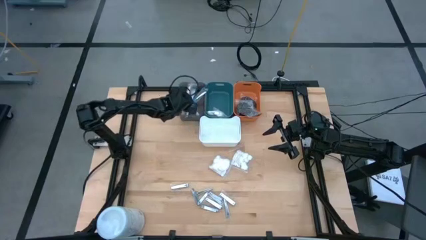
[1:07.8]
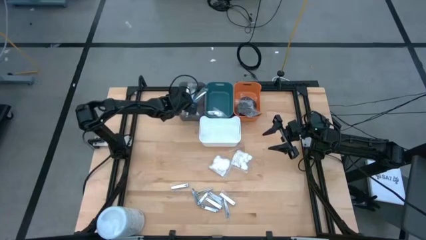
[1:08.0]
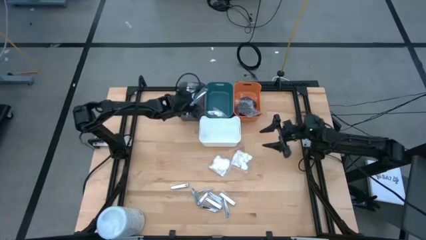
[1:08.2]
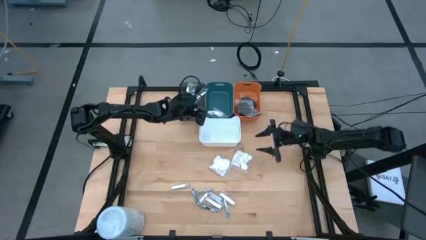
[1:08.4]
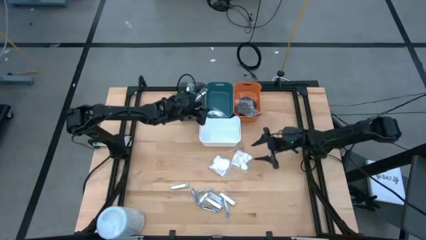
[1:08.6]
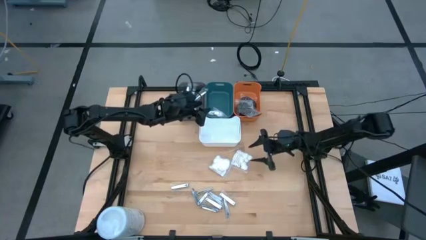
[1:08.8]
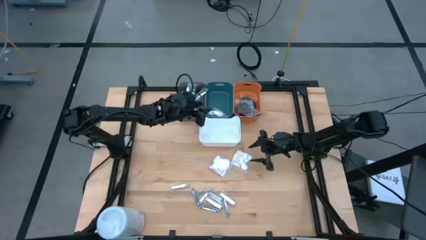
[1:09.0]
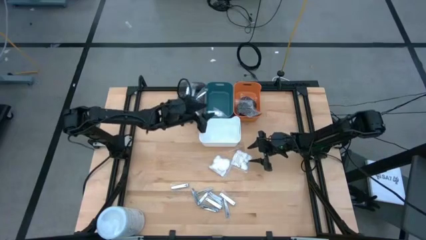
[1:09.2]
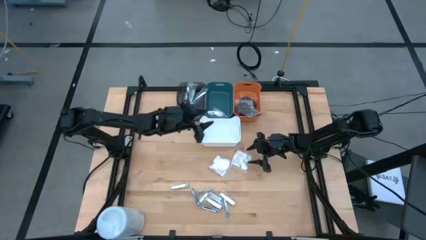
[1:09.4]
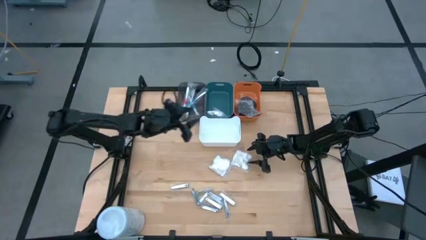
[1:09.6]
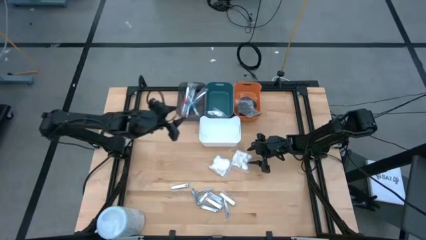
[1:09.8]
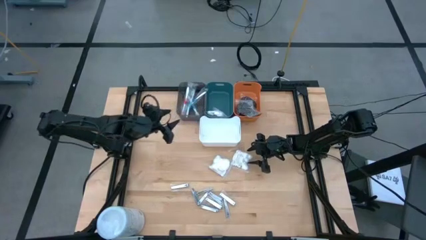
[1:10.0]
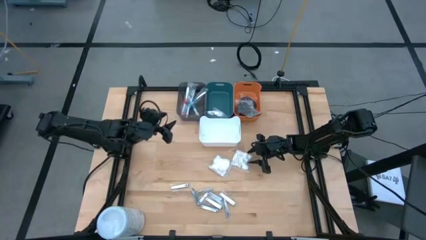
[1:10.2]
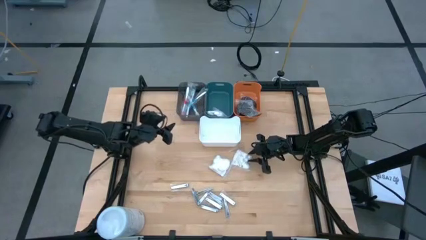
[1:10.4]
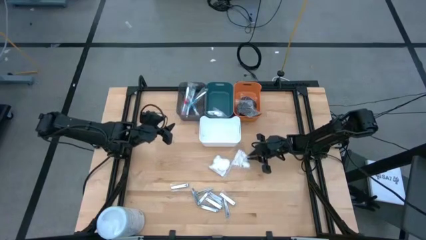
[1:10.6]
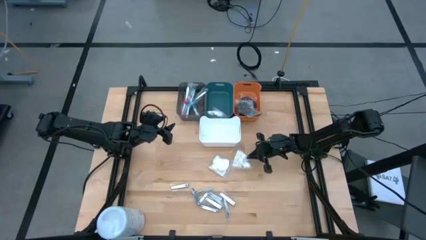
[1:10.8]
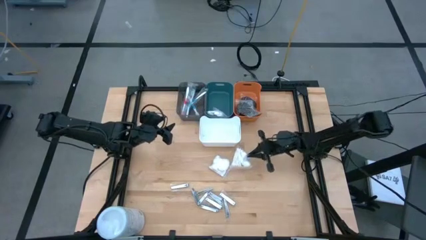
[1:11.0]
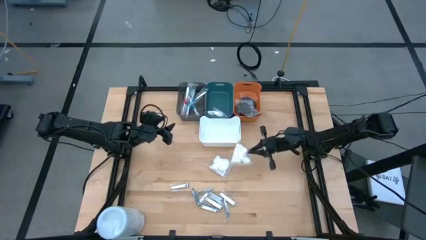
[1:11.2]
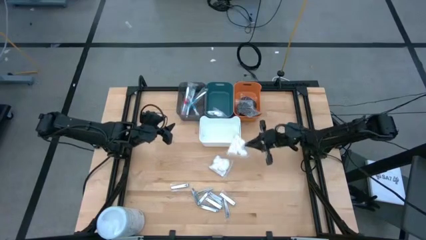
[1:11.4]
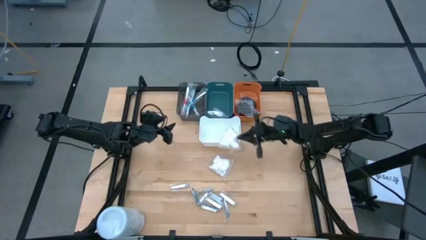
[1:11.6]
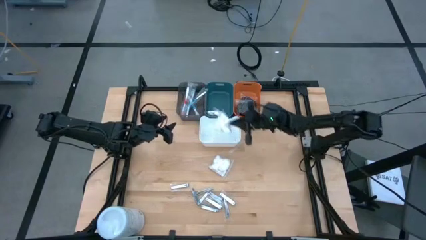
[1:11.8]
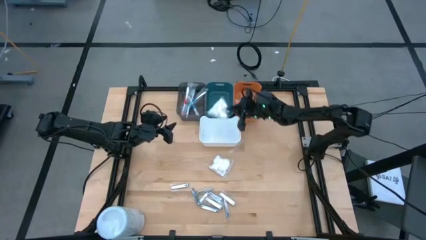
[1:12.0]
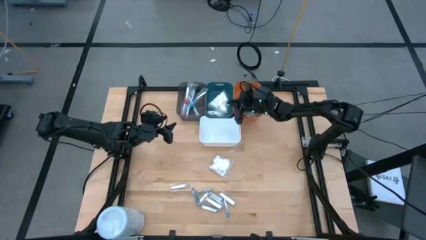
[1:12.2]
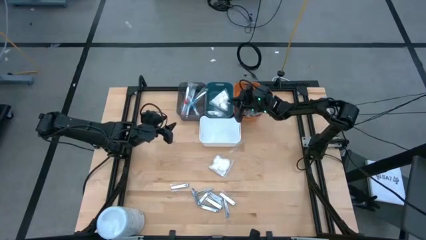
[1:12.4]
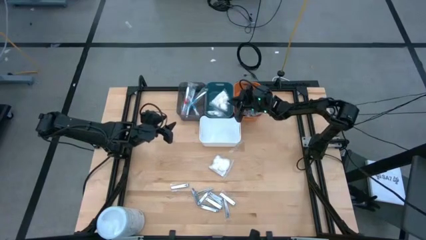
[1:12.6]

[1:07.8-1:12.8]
Task: Pick & Place Travel size toiletries
Put the cotton pack into the blue bin

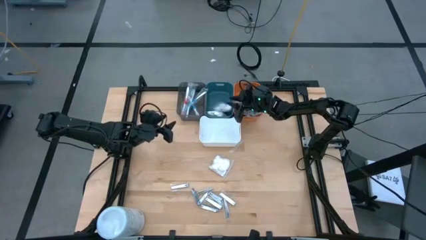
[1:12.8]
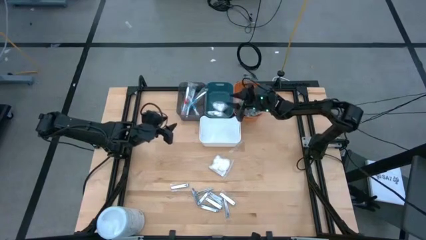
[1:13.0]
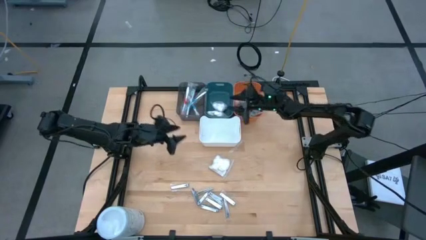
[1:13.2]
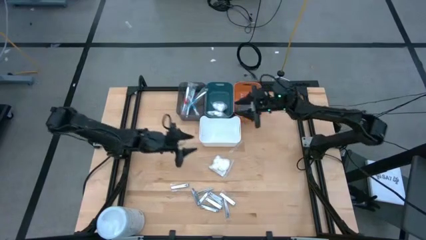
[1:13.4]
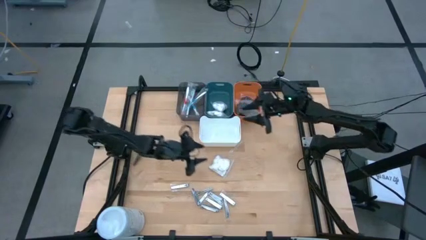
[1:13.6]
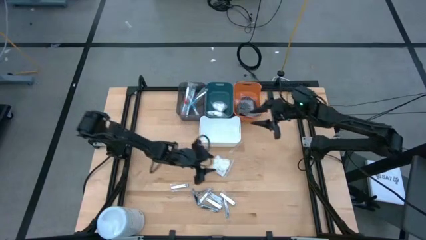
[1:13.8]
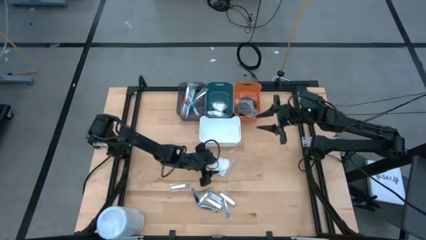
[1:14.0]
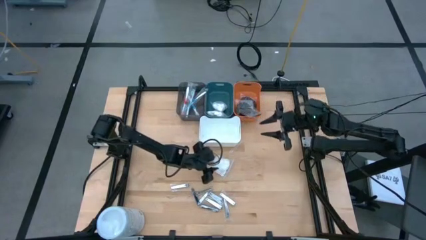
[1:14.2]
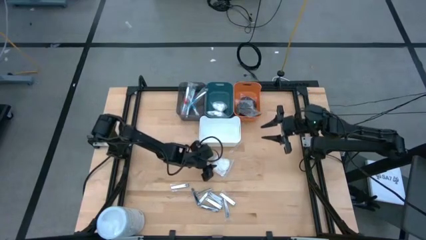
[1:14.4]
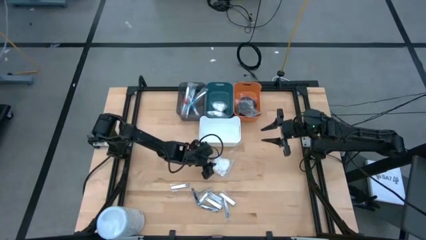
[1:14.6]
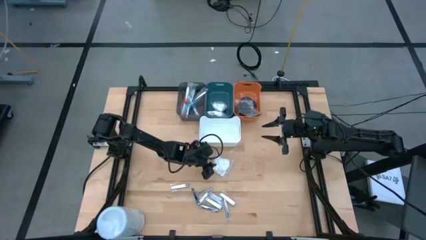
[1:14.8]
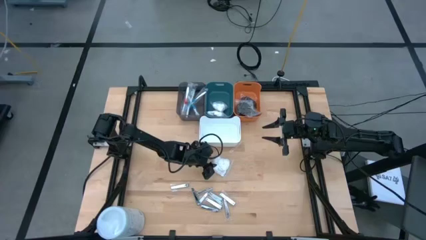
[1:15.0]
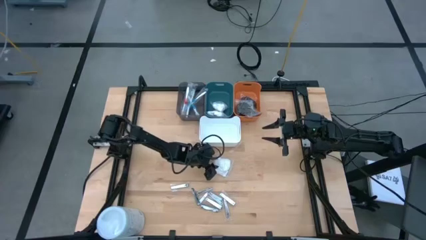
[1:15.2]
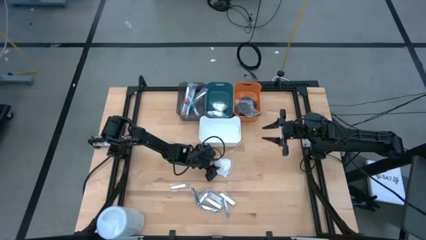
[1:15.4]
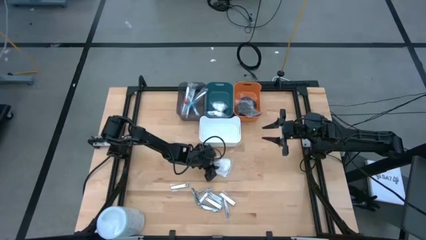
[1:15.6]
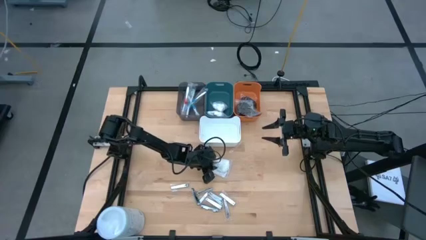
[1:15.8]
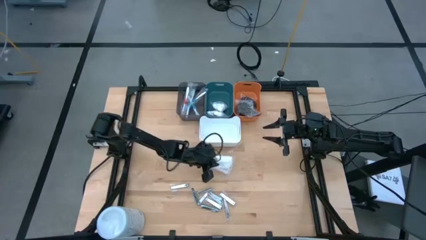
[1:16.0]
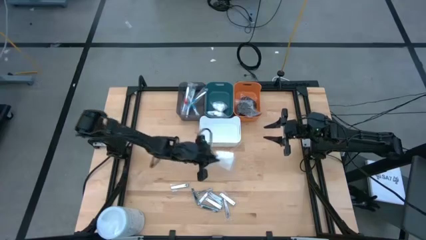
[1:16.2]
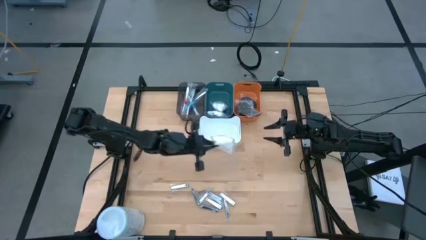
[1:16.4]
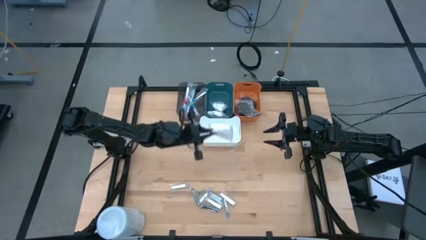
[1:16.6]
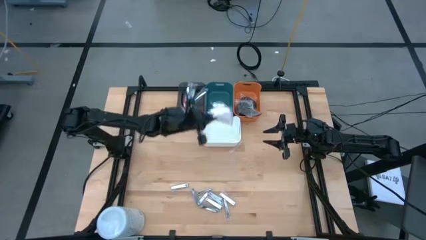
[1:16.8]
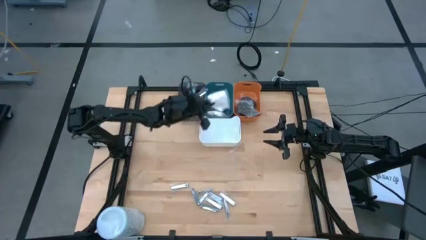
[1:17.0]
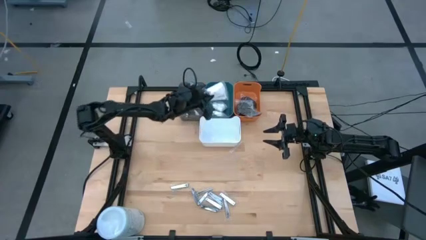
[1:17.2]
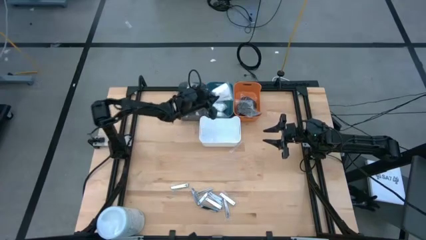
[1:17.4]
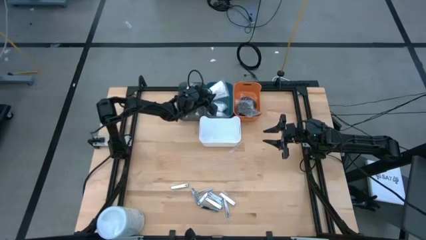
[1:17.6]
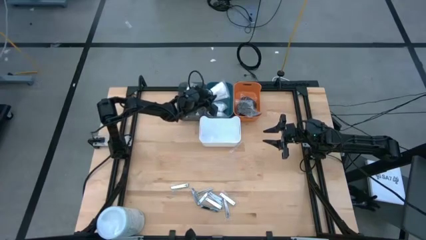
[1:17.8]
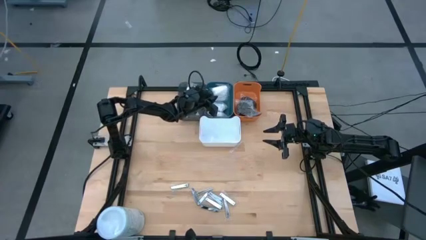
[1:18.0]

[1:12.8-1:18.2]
Put the cotton pack into the blue bin

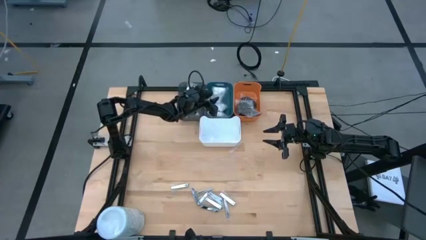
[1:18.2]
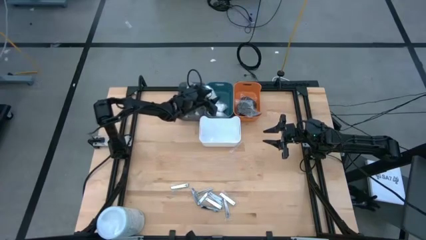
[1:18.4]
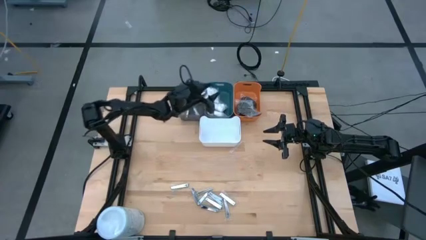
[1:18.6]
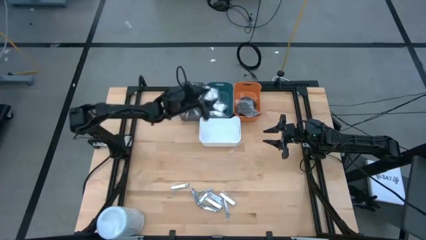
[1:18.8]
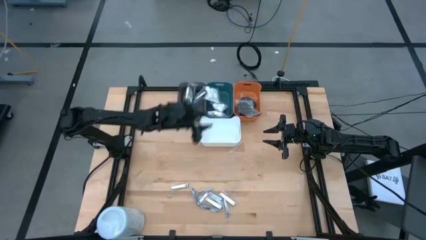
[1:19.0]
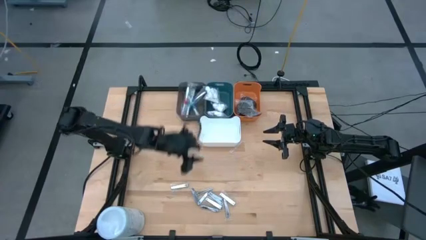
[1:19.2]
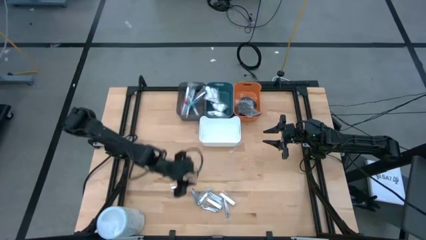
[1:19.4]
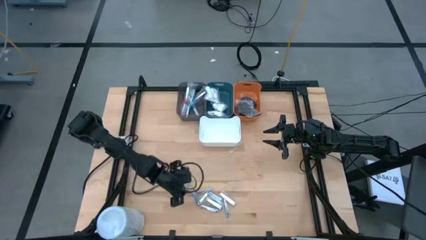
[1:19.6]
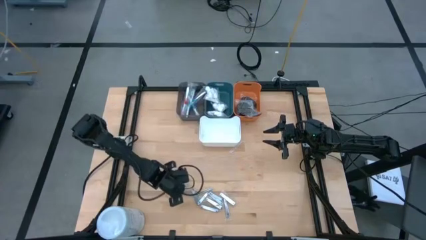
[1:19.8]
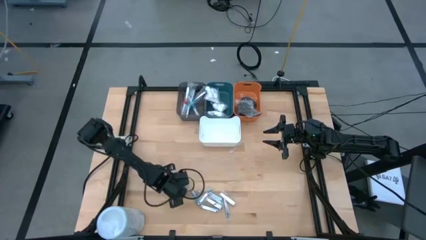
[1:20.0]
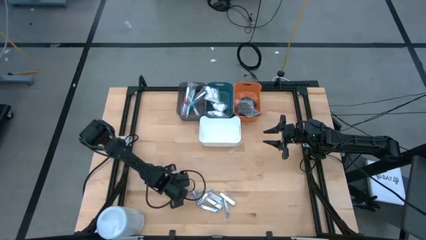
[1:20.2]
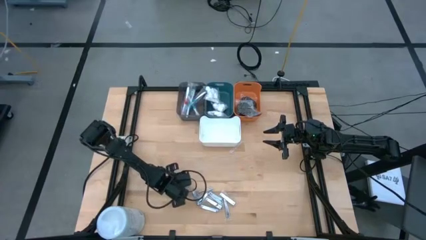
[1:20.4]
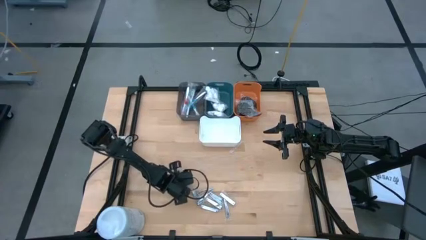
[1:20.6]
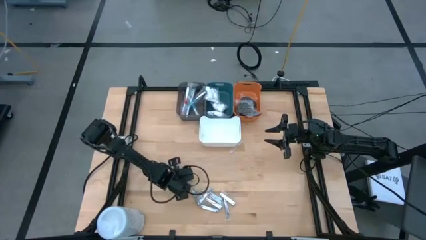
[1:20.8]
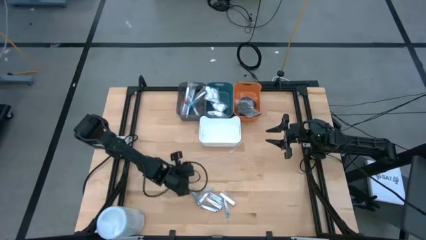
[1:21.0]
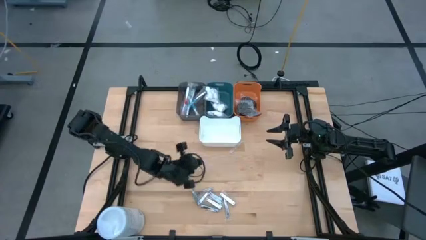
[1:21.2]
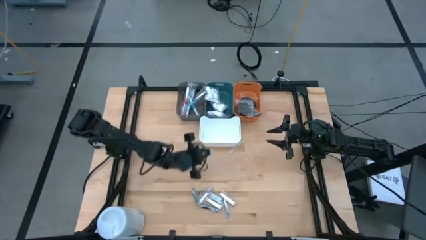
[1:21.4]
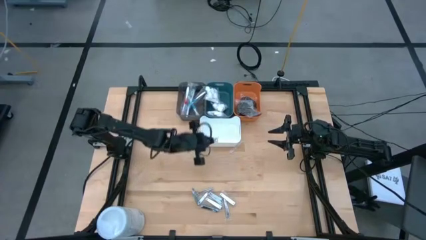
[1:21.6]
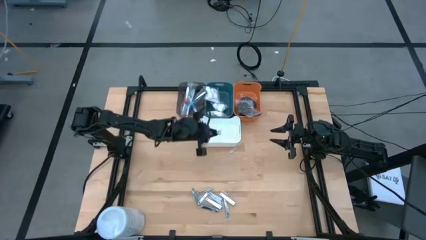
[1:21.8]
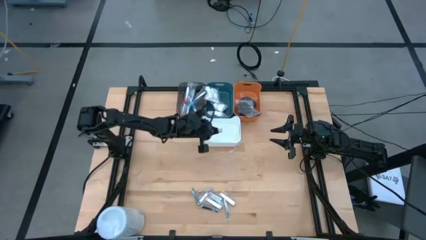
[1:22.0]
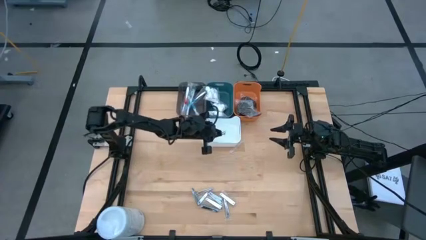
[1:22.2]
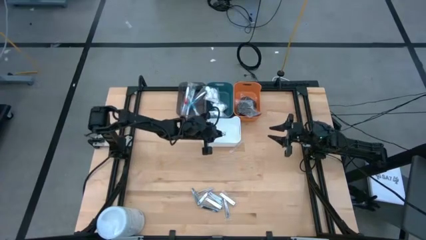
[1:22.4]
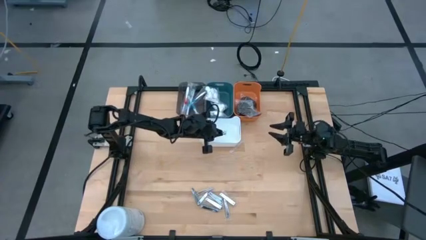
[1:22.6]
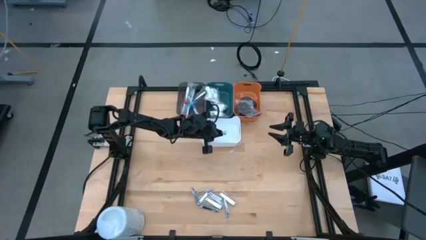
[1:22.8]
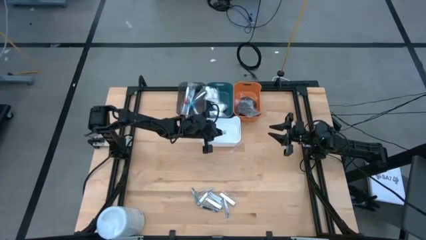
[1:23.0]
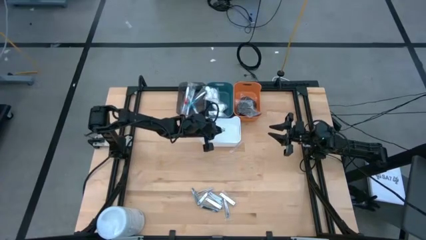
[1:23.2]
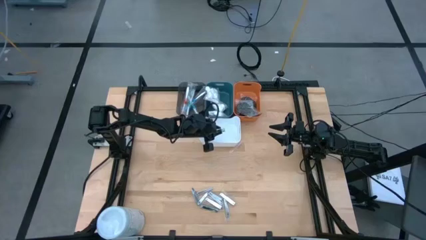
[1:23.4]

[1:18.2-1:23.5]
Put the silver nail cutter into the white bin
